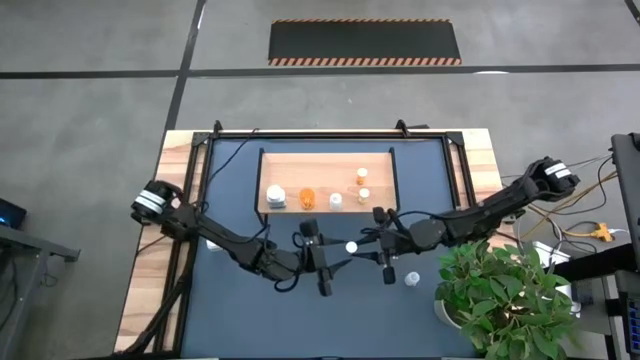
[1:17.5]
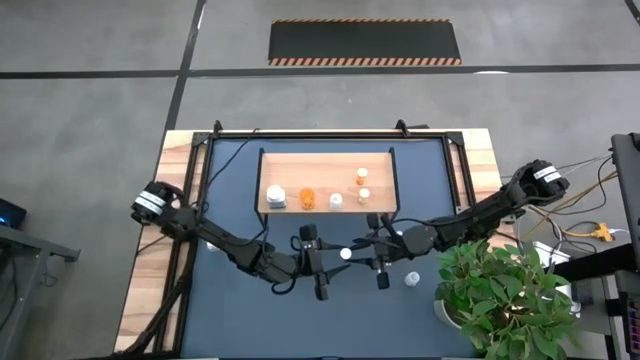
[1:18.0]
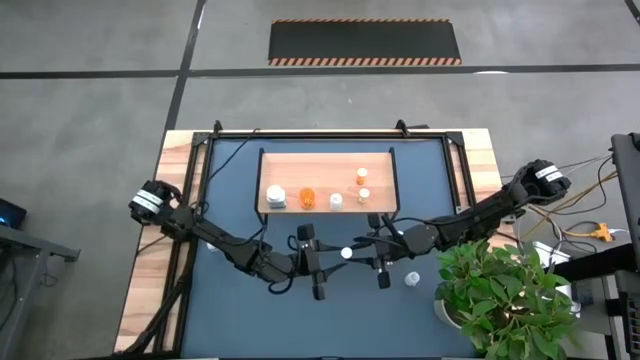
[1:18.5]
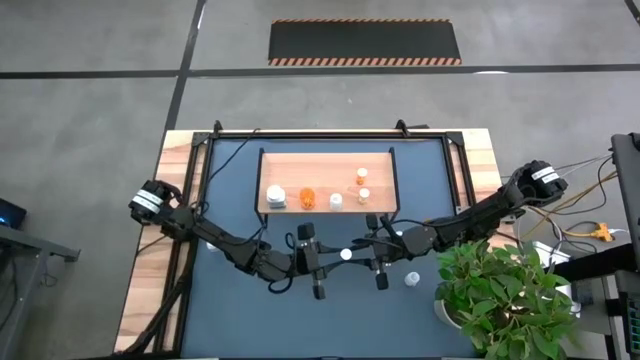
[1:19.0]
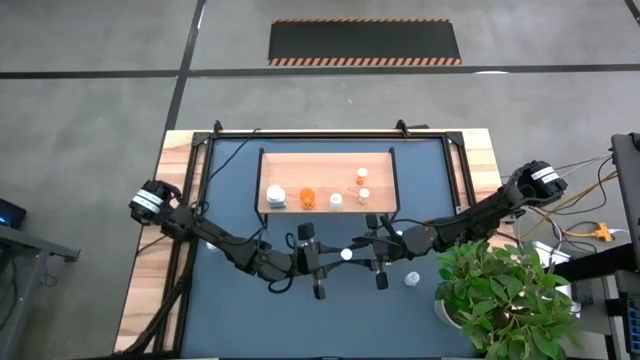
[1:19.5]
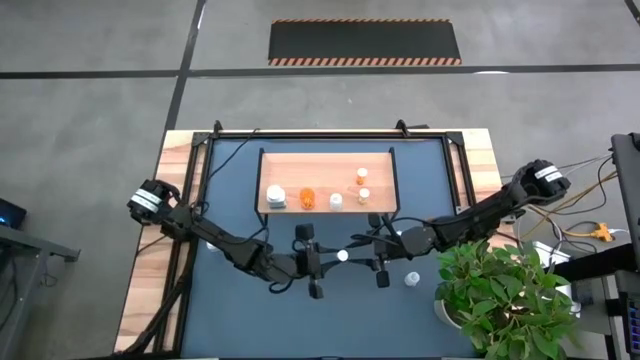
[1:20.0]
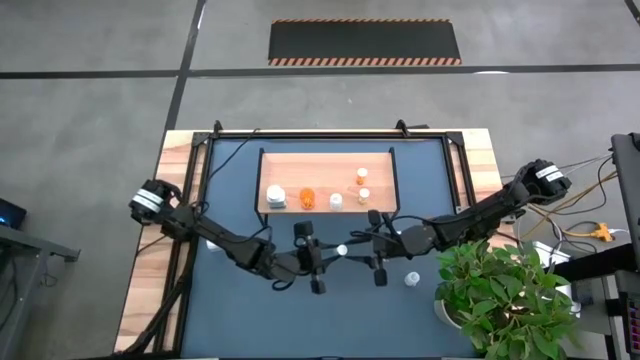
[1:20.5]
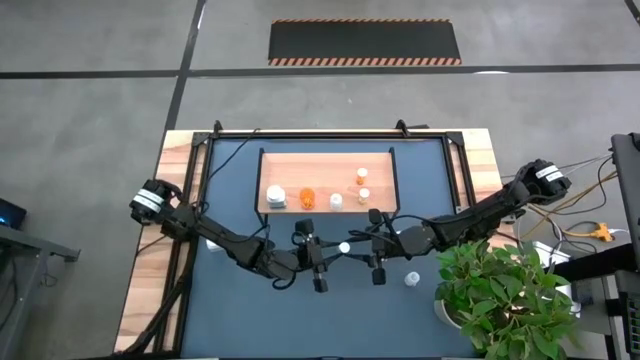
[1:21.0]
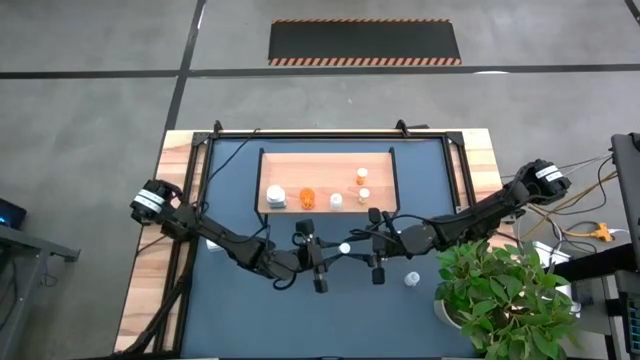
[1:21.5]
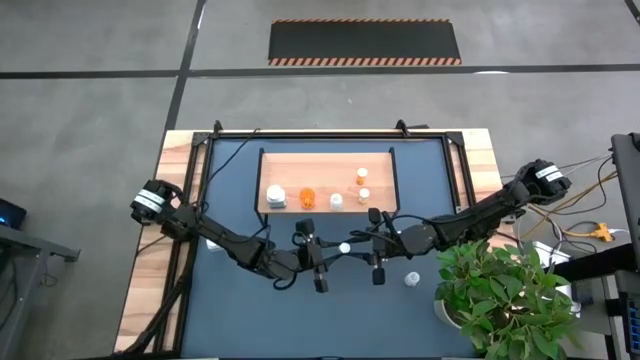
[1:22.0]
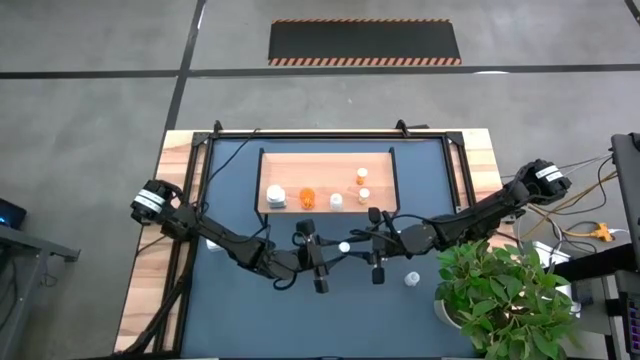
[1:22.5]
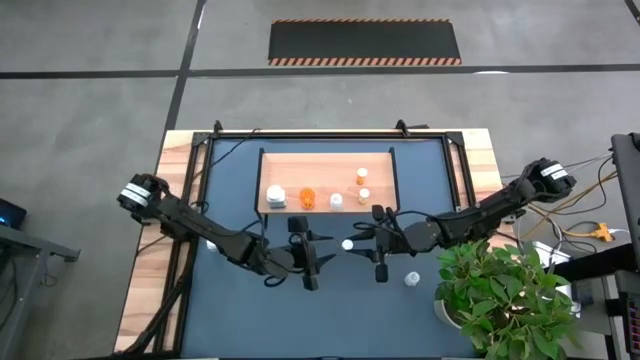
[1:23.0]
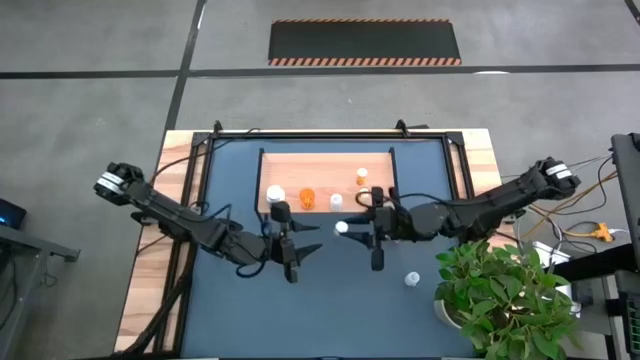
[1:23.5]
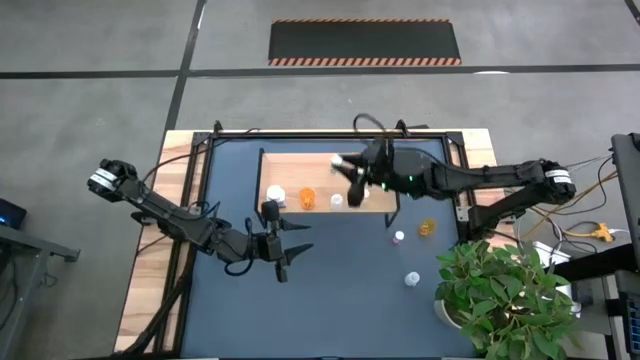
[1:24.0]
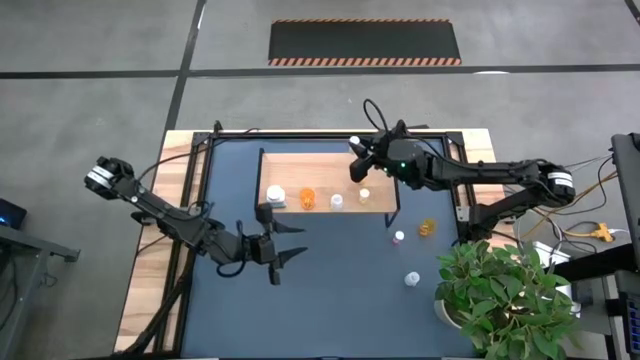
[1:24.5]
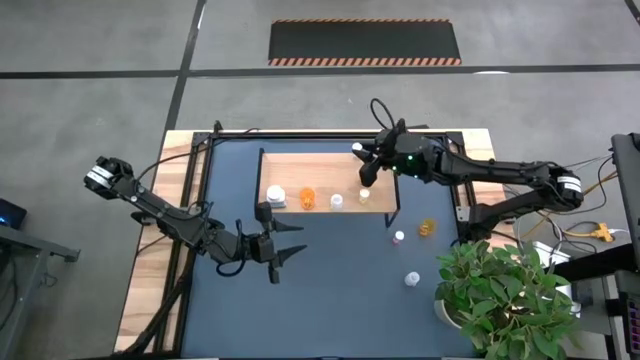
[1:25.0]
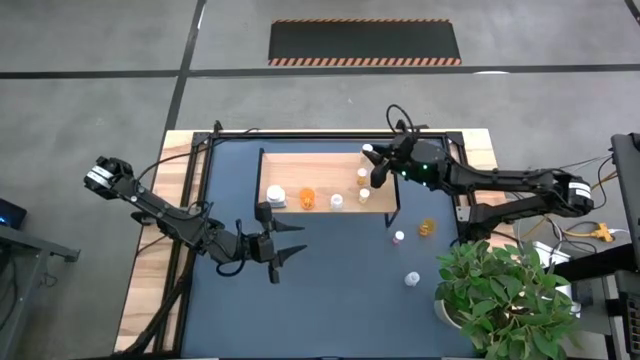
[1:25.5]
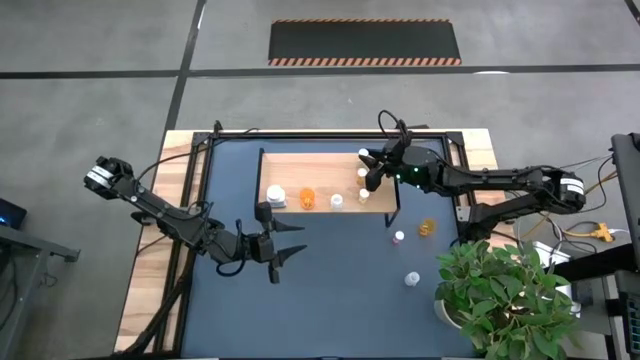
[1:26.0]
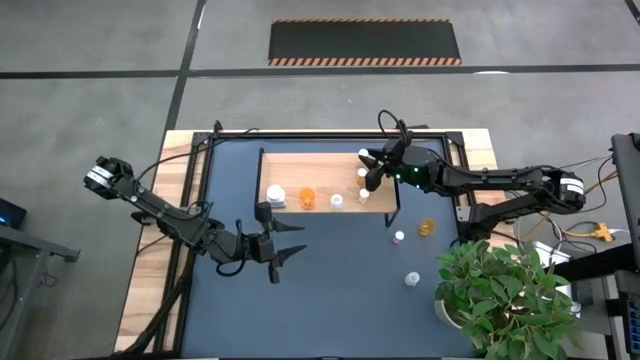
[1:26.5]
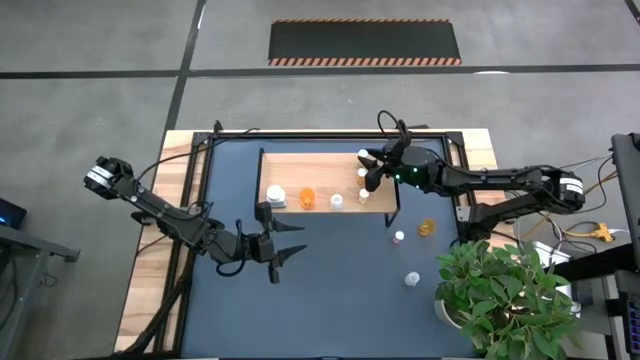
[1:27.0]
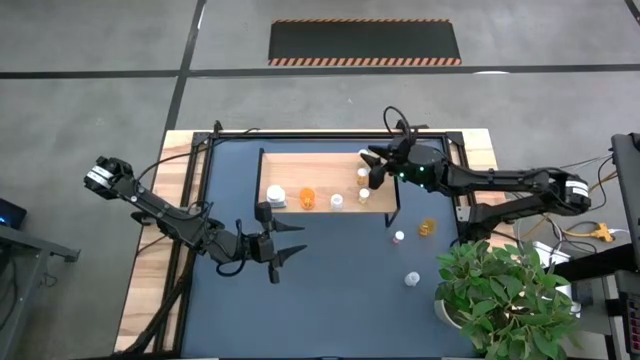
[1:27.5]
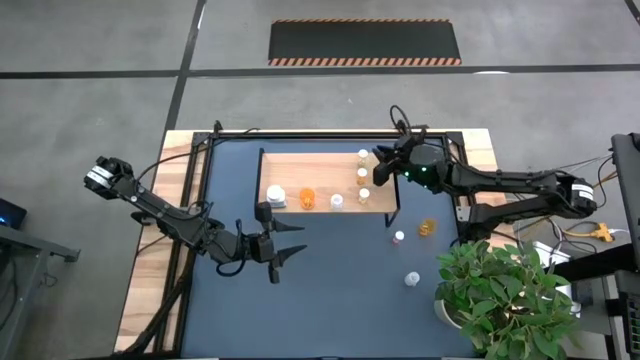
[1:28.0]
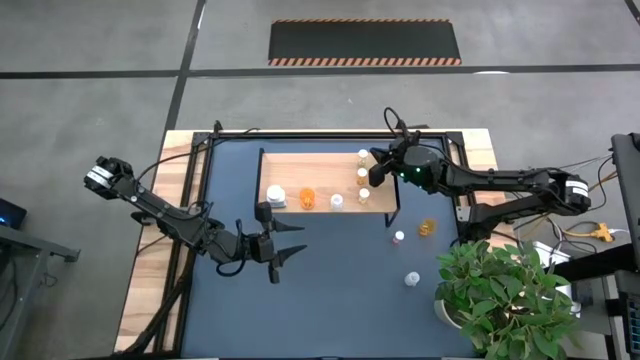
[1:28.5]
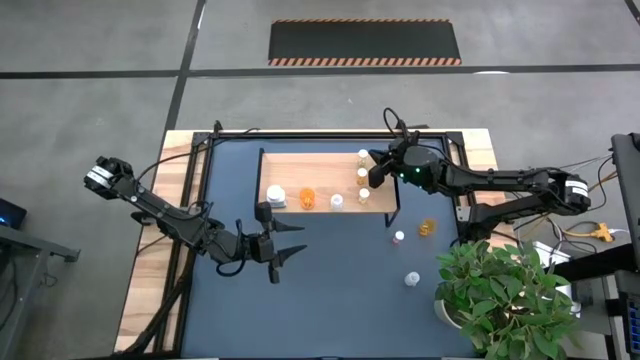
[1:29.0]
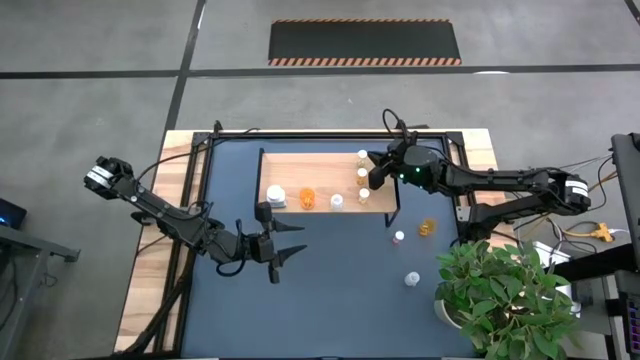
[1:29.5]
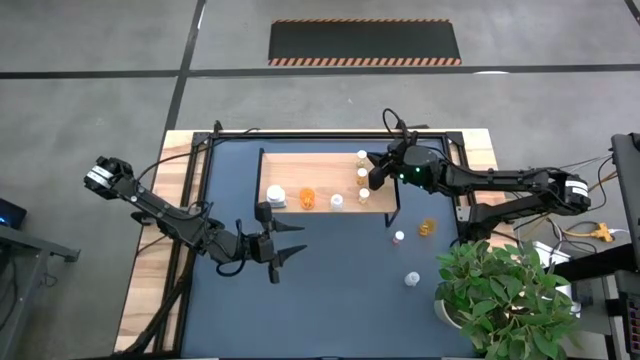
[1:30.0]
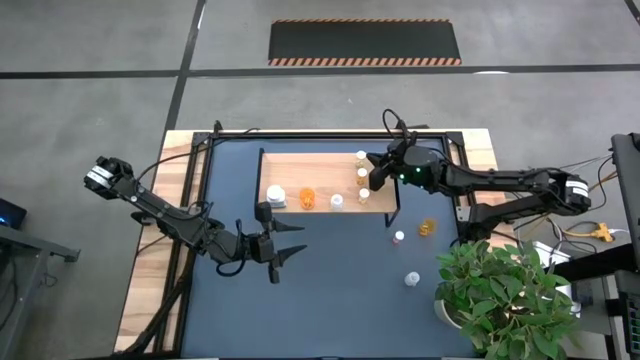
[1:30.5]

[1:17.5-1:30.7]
Task: Pick and place medicine bottles onto shelf by color
Put the yellow bottle on the shelf aligned

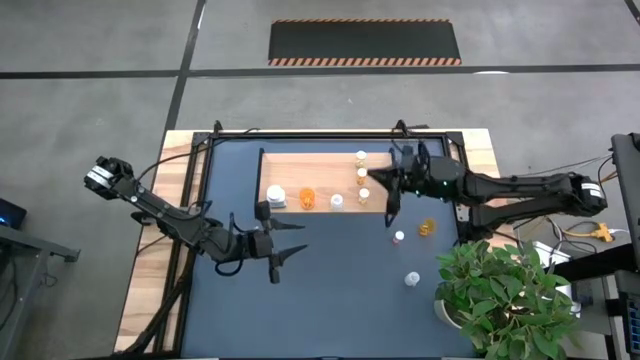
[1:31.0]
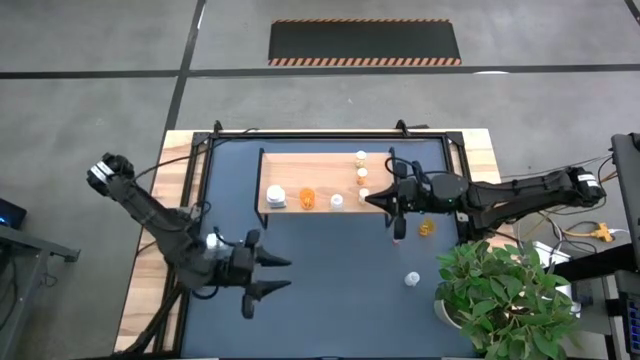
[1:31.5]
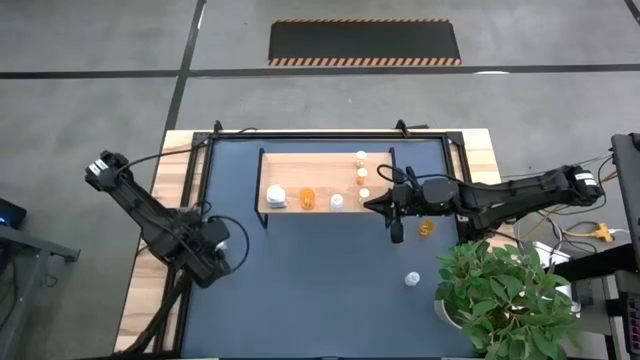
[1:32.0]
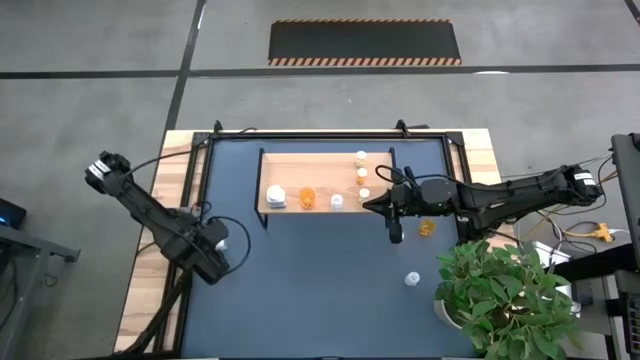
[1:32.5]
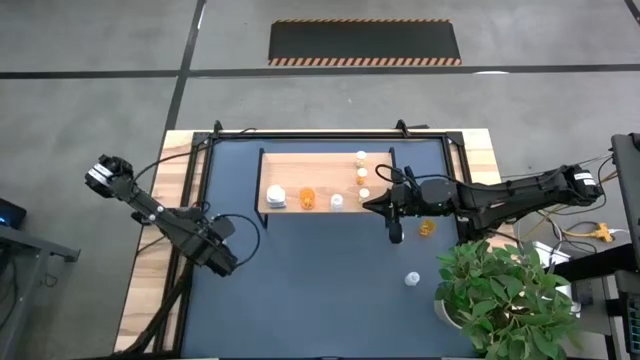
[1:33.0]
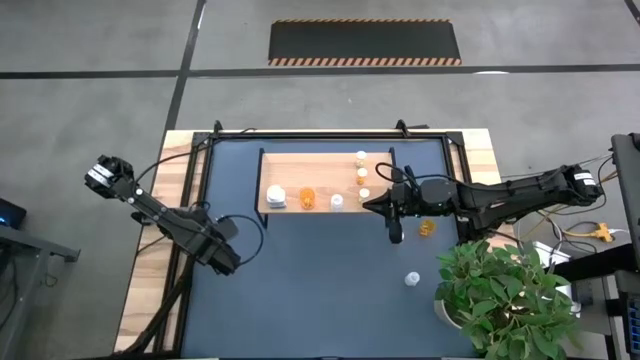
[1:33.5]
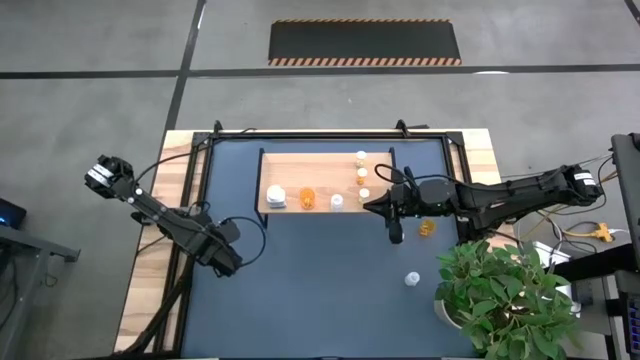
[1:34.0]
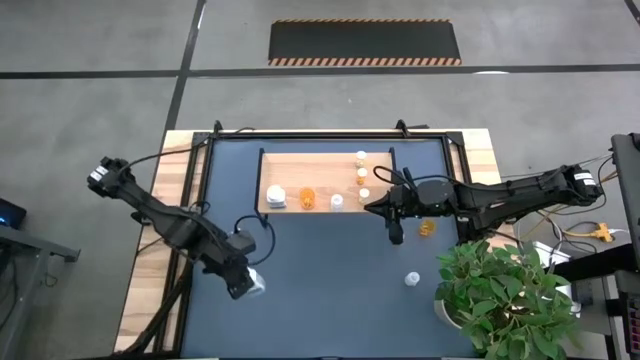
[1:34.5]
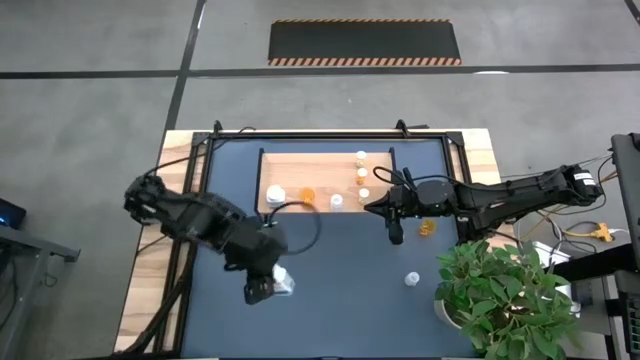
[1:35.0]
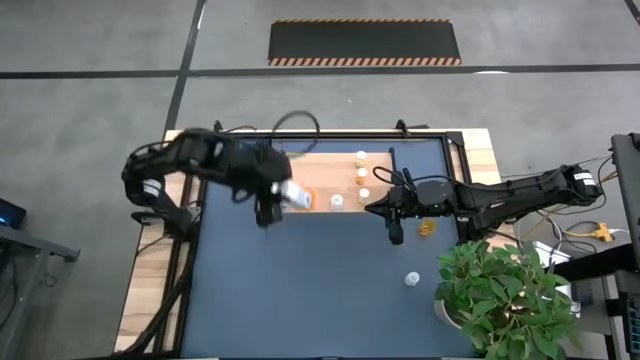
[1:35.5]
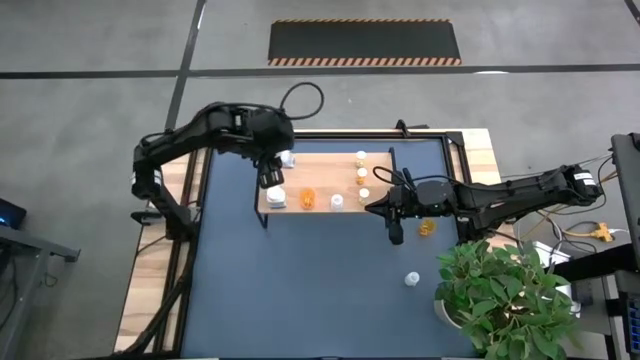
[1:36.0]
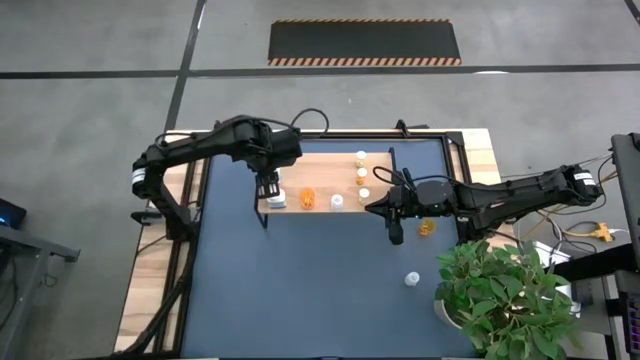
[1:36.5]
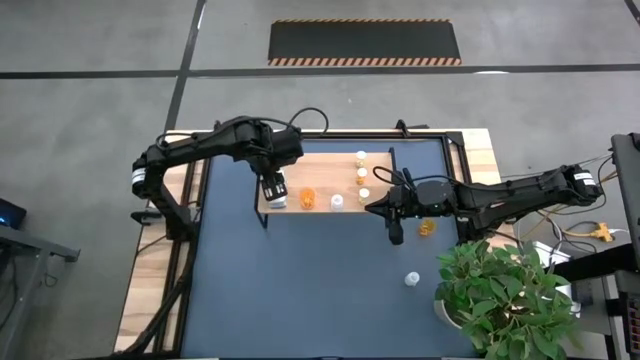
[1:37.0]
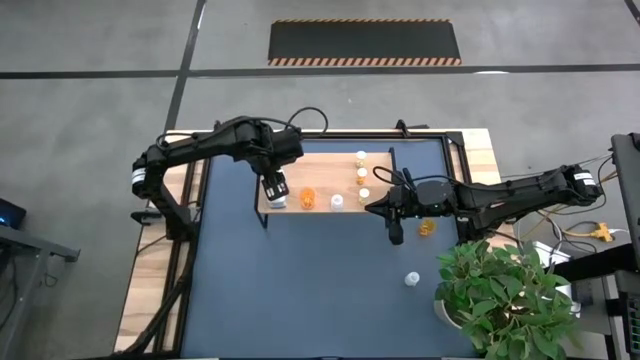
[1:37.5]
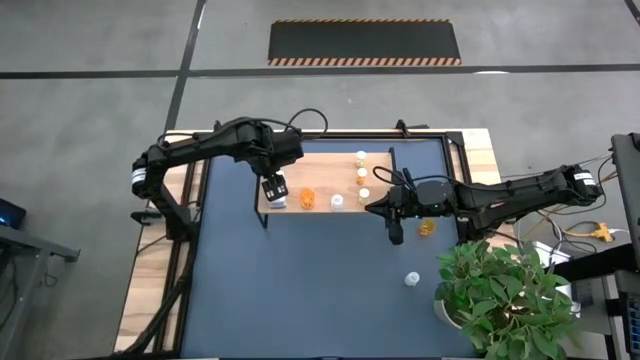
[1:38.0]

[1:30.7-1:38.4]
Put the white bottle on the shelf
